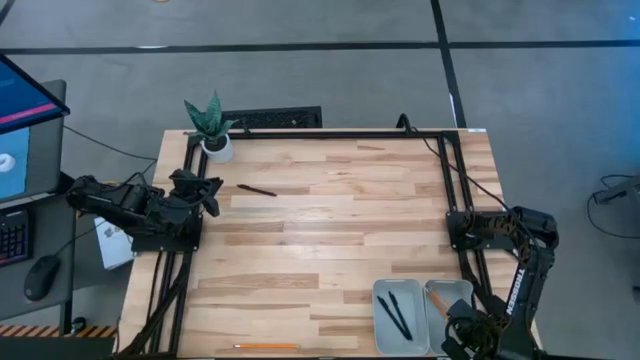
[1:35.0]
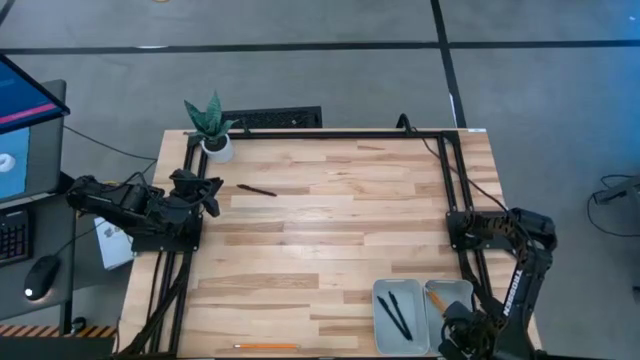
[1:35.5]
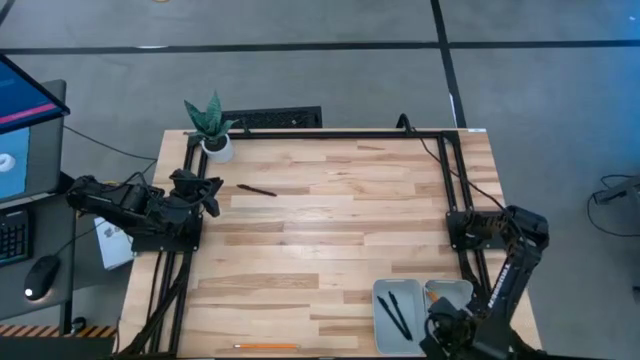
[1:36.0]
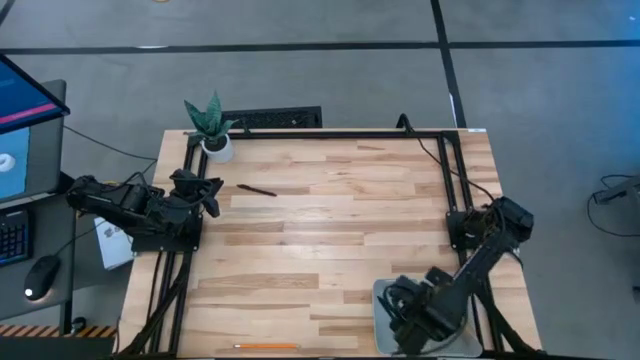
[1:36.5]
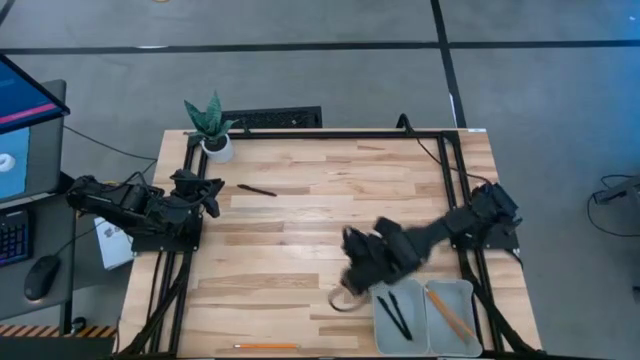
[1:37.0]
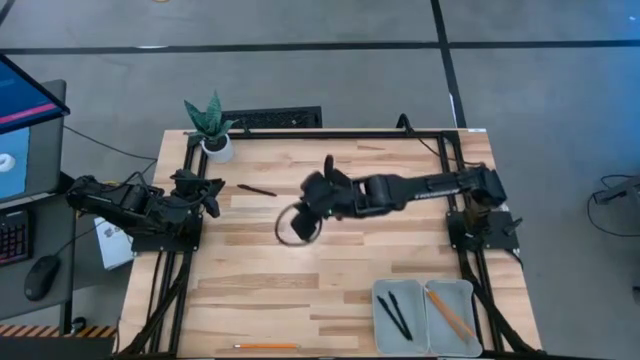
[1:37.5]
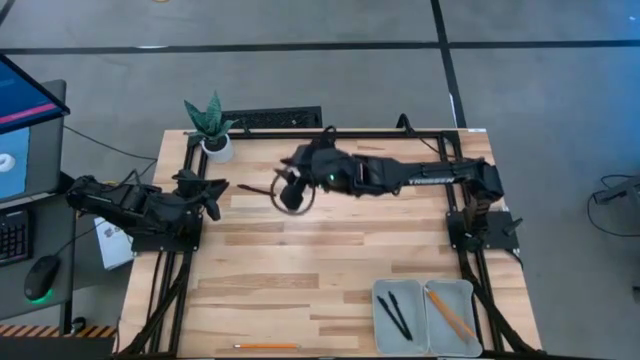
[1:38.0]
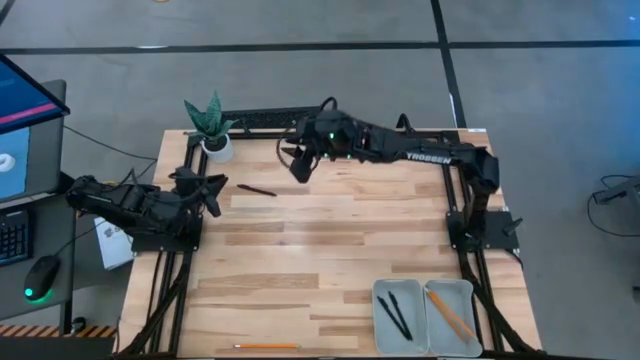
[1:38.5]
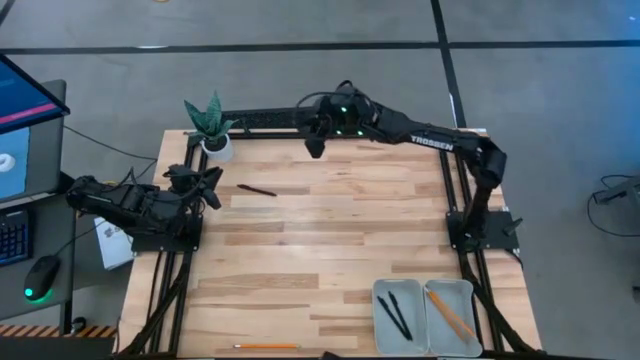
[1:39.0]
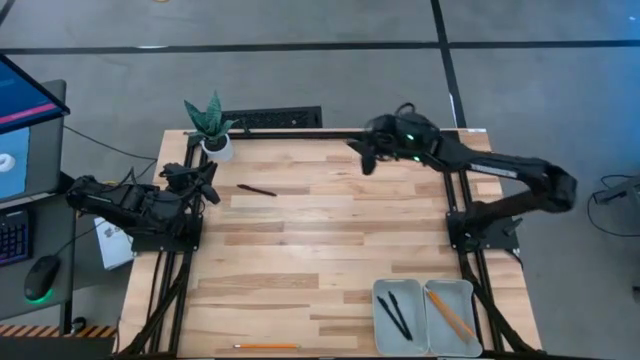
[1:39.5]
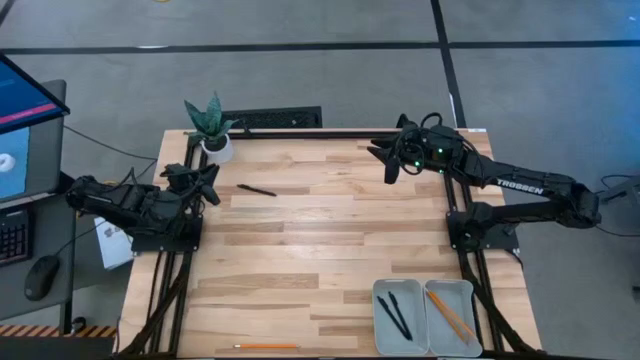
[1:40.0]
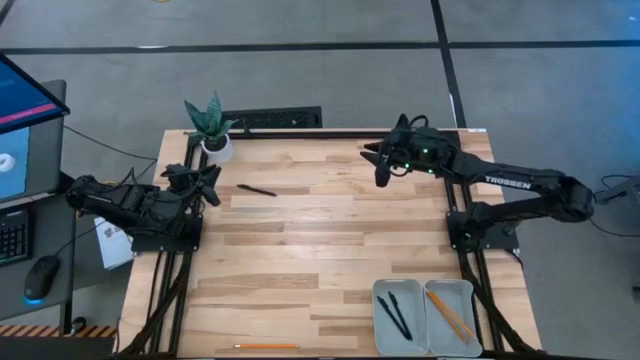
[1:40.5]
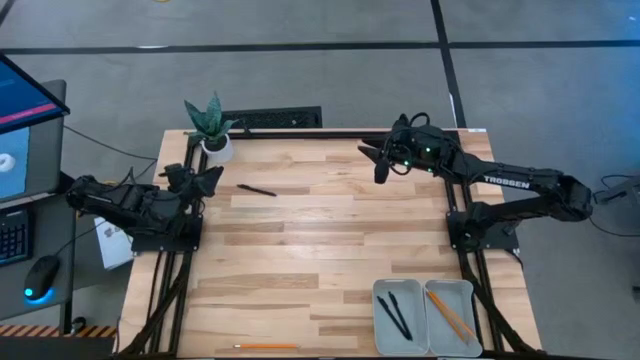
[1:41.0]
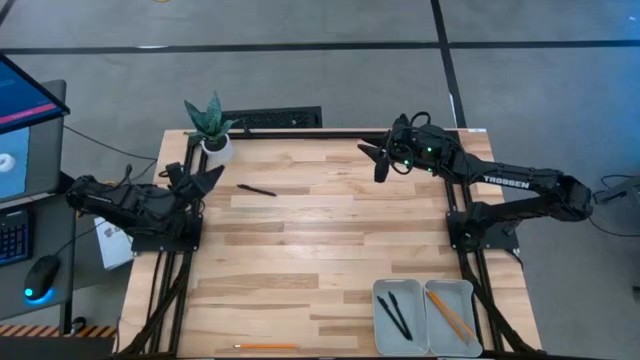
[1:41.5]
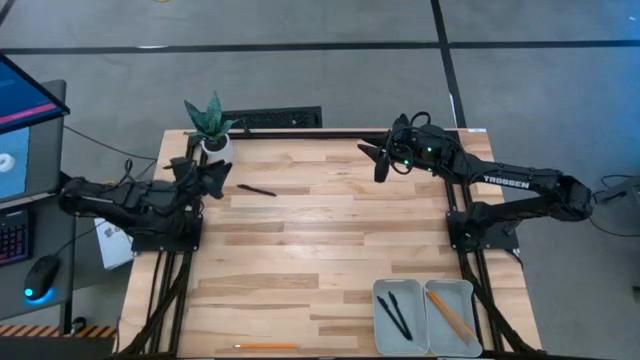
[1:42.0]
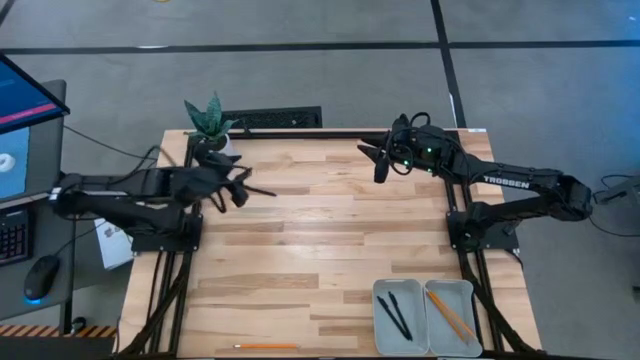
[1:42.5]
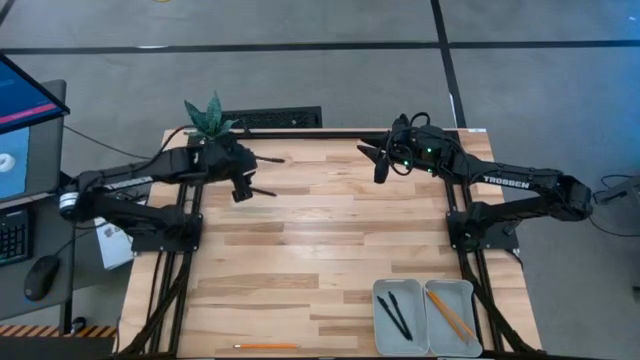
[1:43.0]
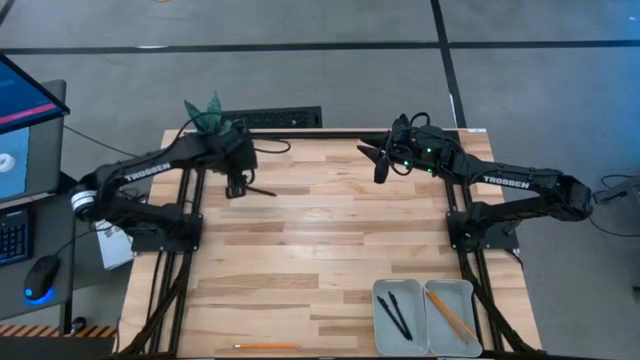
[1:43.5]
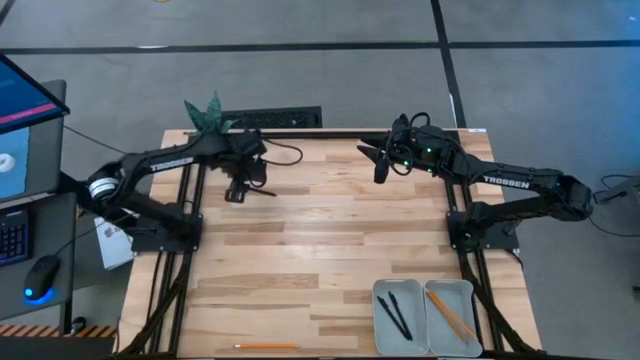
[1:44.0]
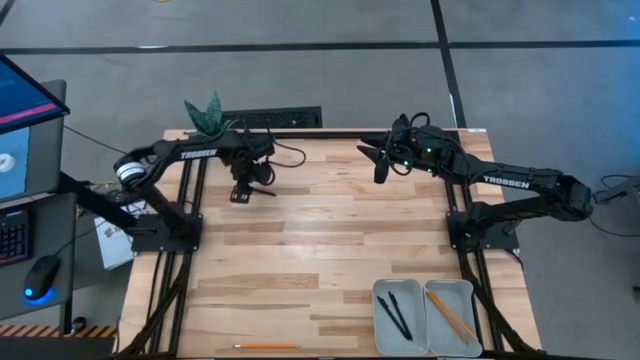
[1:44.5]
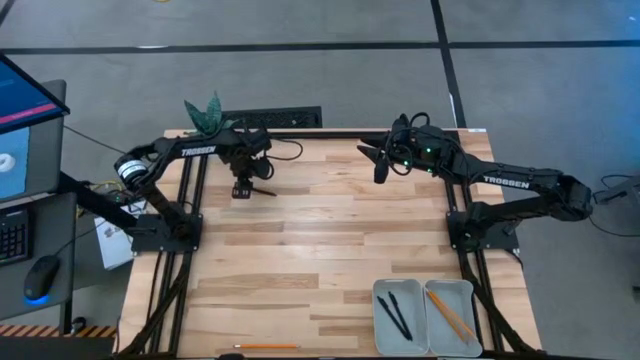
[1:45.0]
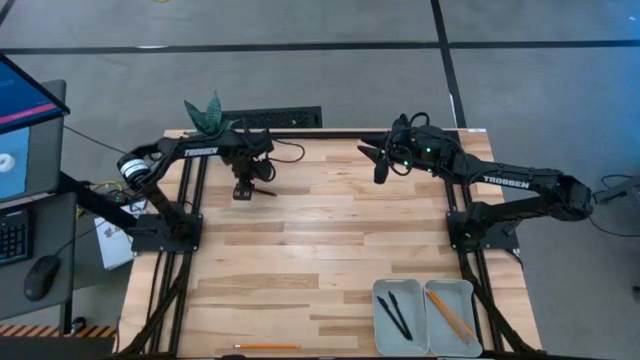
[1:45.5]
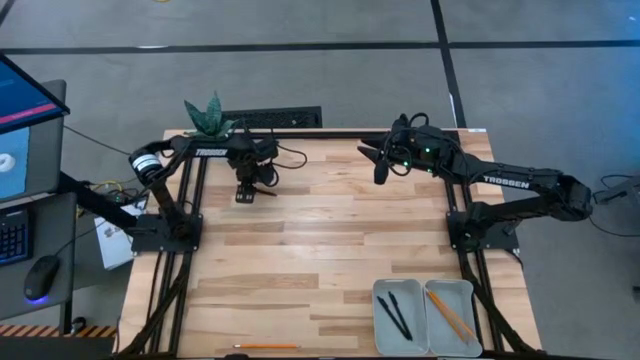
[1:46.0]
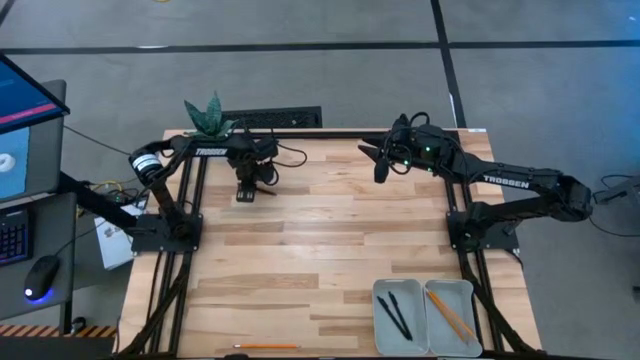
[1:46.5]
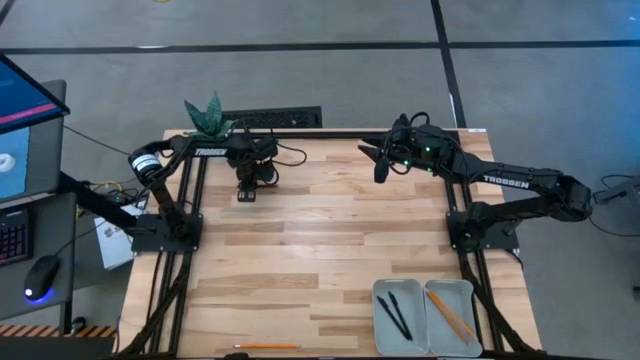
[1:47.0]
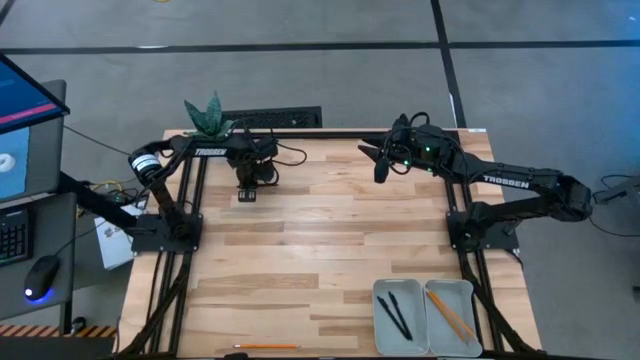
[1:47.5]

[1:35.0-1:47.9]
Task: Sort pens & pencils
Put the black pen into the bottom left gray bin

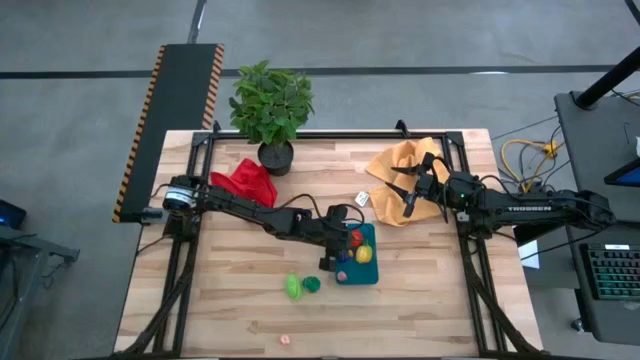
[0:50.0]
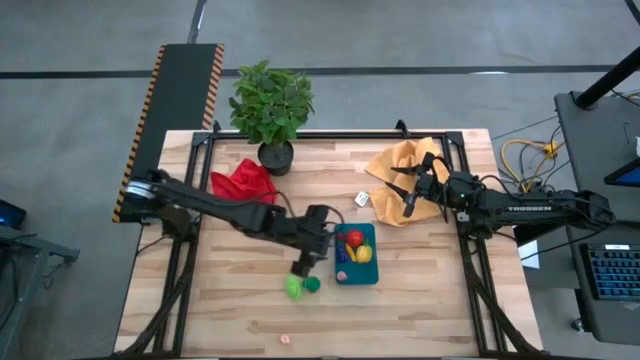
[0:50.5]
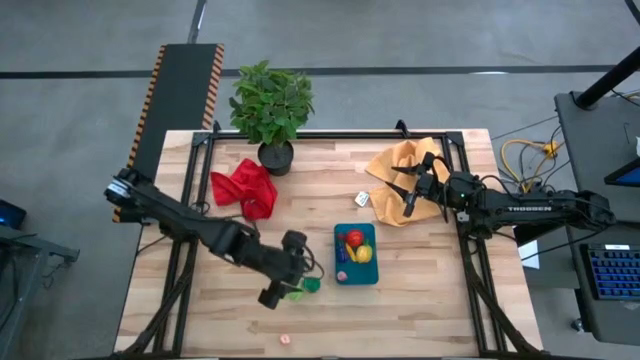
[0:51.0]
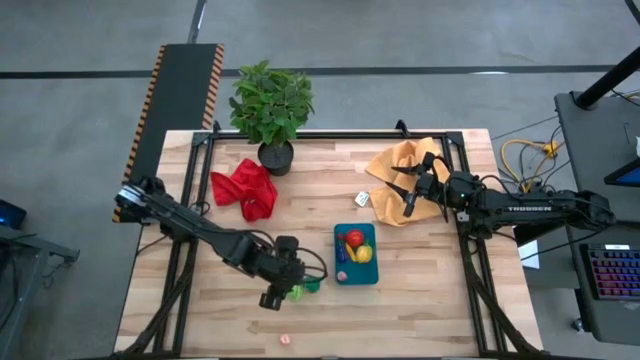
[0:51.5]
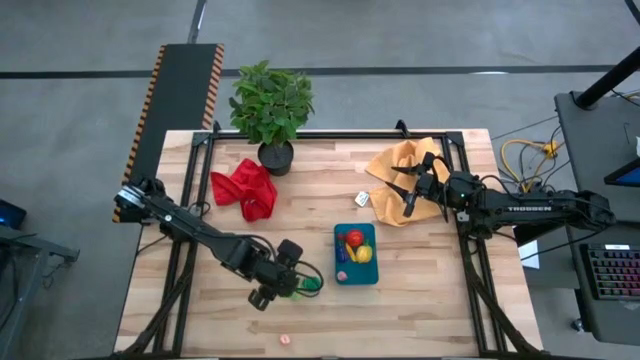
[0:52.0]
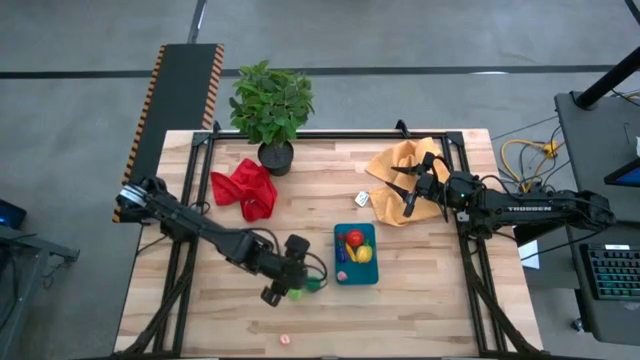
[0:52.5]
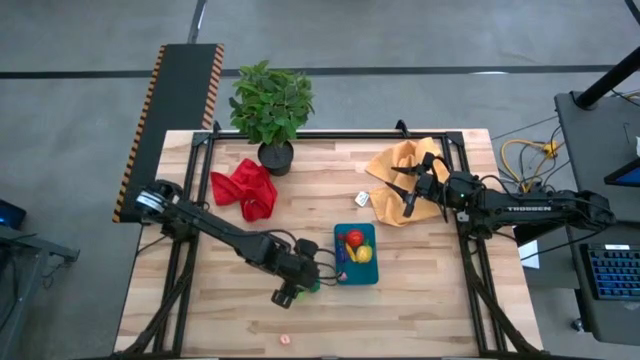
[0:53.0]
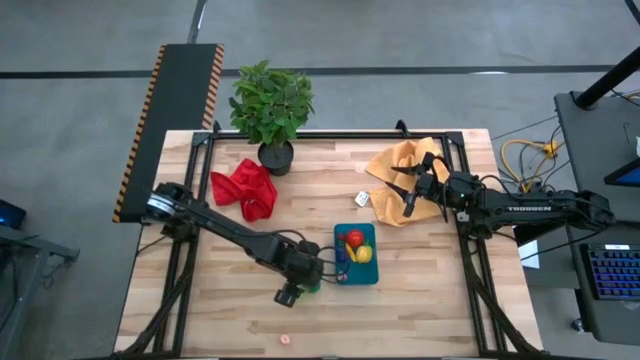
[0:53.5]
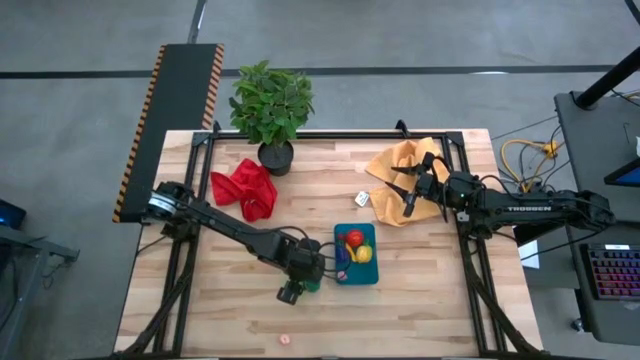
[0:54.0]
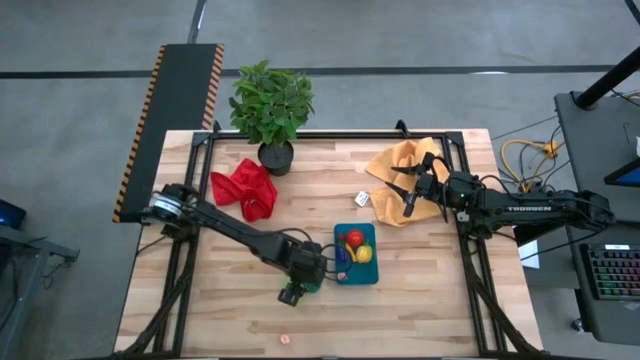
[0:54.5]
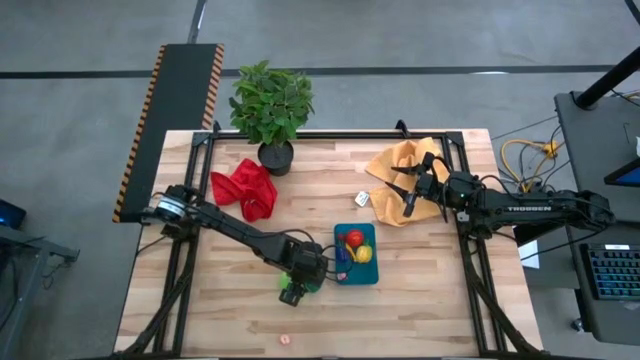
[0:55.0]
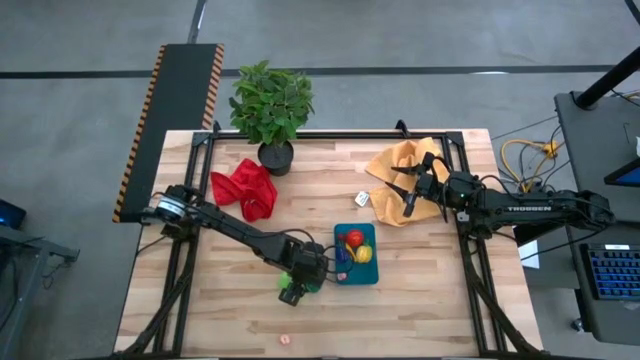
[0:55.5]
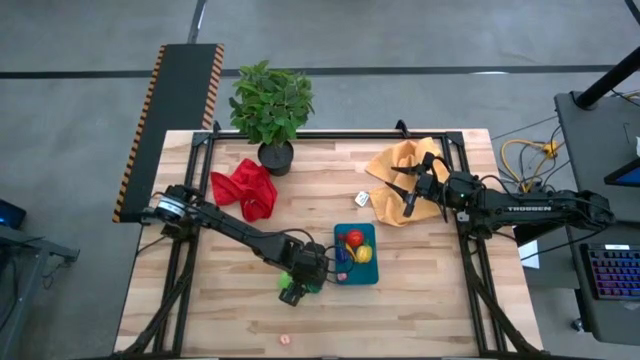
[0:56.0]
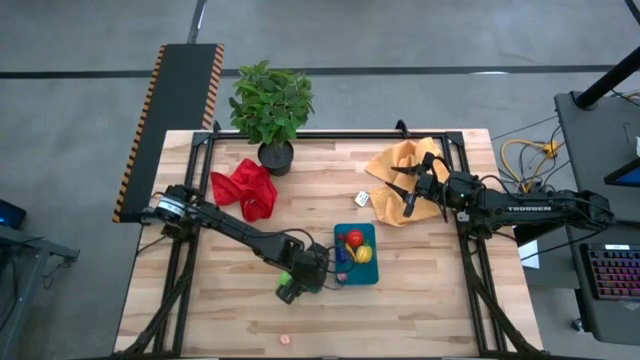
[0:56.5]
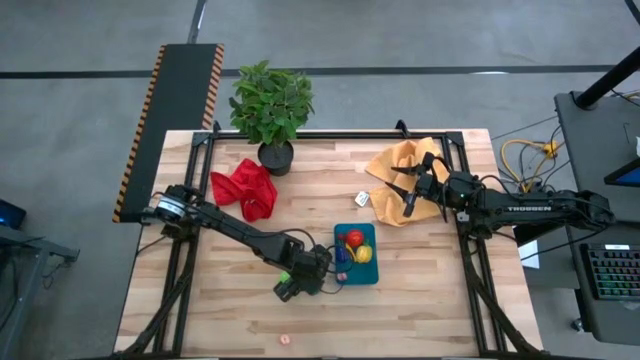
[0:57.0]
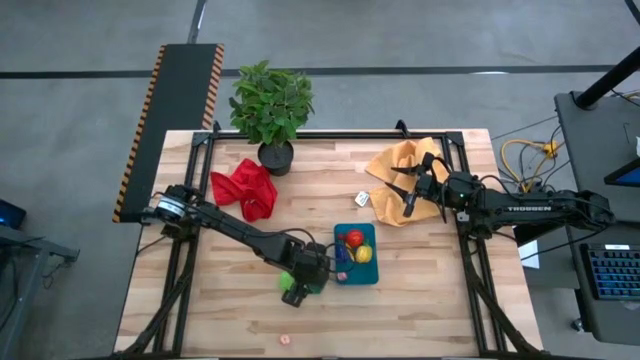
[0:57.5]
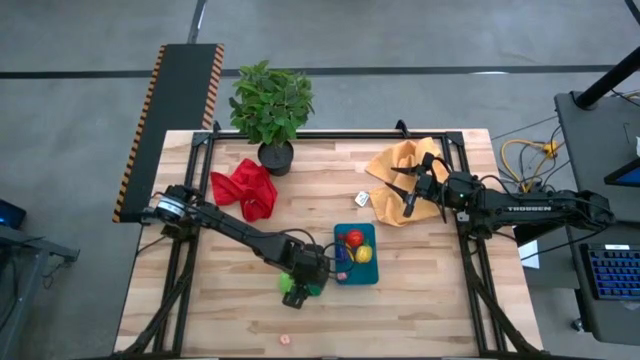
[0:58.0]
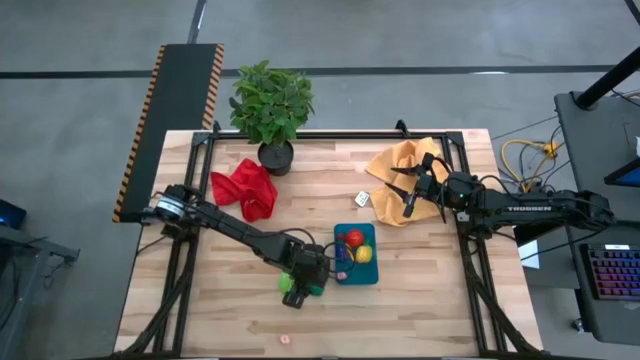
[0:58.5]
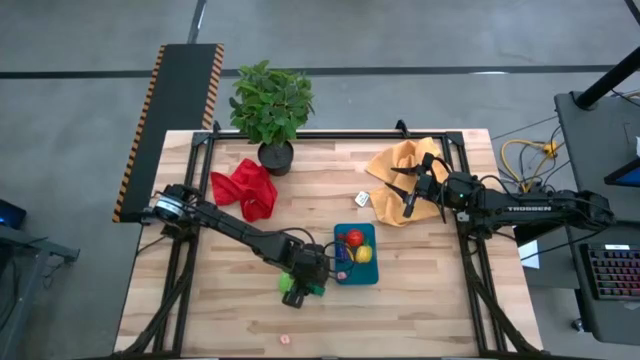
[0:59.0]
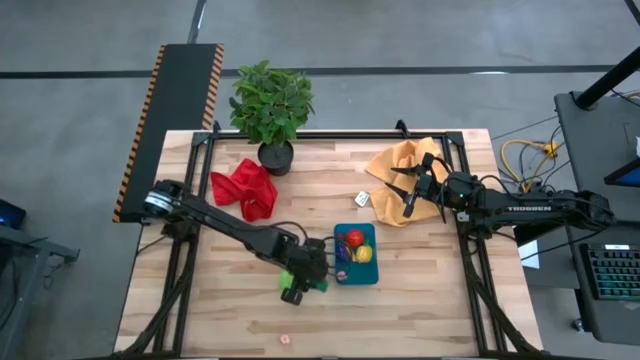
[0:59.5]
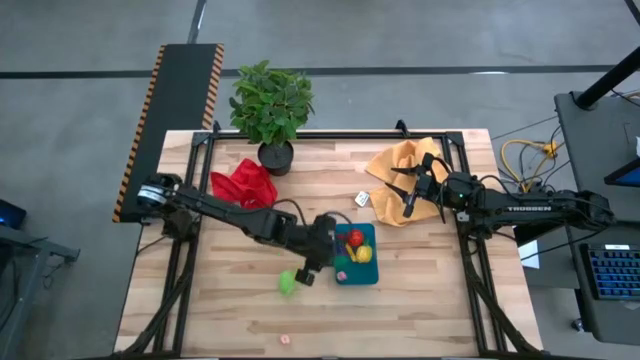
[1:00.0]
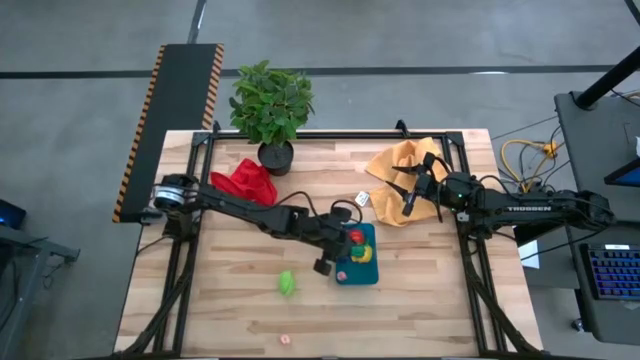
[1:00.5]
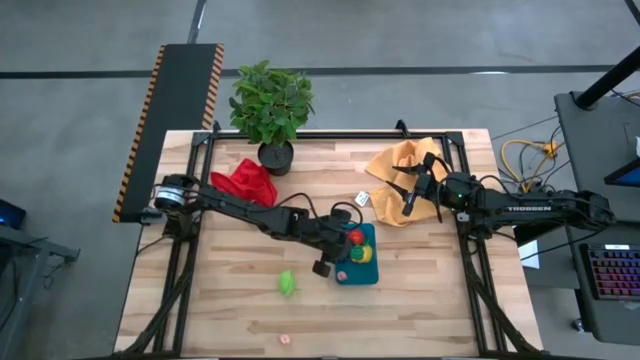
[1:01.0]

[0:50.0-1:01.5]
Task: Pick and placing Produce into tupperware
Put the green bell pepper into the blue bin
